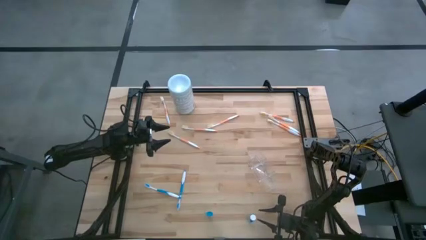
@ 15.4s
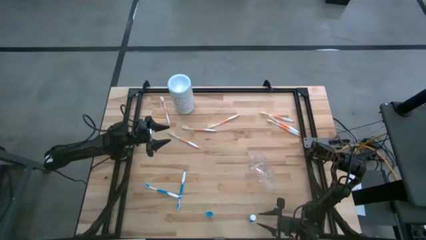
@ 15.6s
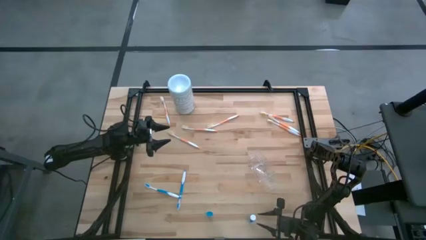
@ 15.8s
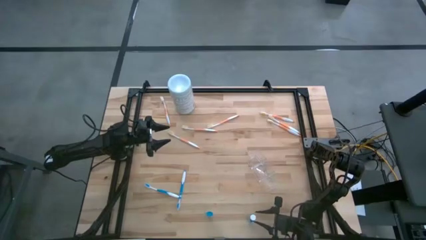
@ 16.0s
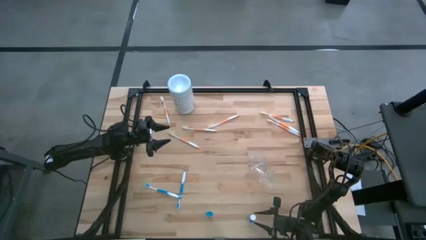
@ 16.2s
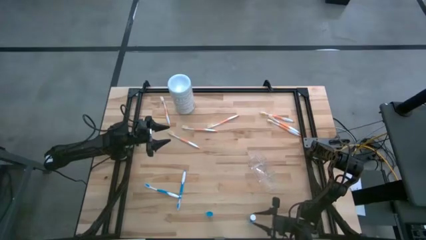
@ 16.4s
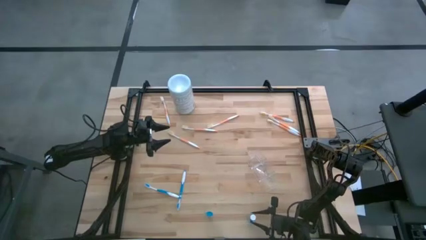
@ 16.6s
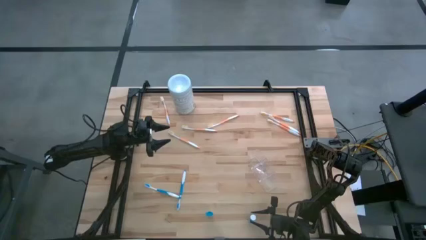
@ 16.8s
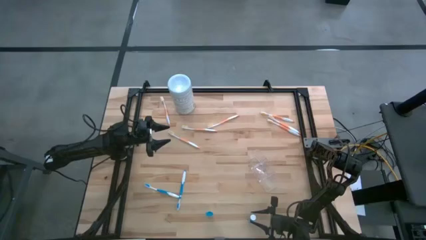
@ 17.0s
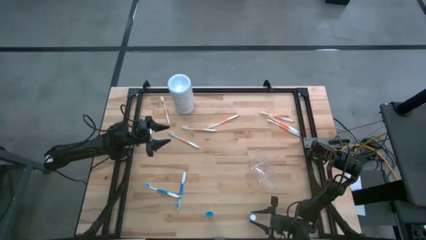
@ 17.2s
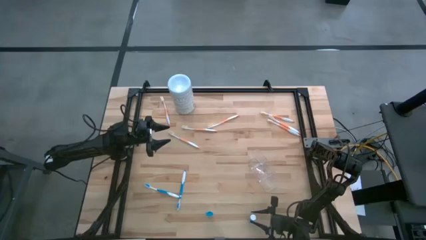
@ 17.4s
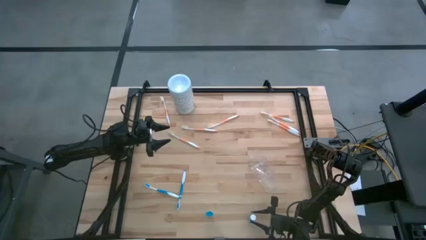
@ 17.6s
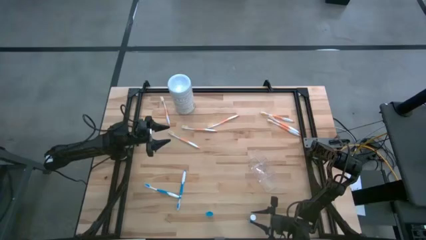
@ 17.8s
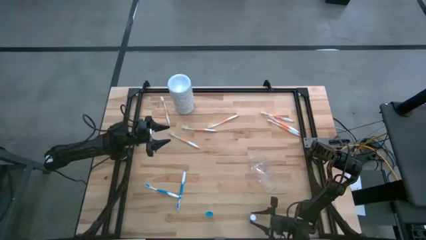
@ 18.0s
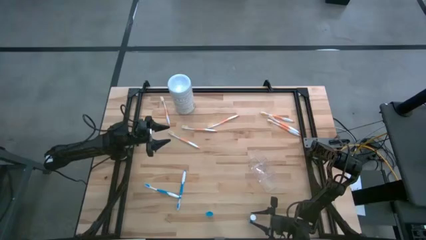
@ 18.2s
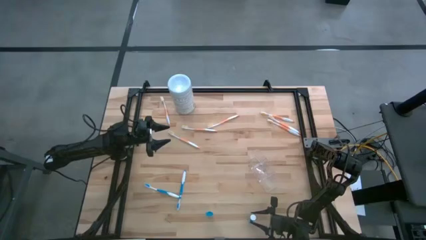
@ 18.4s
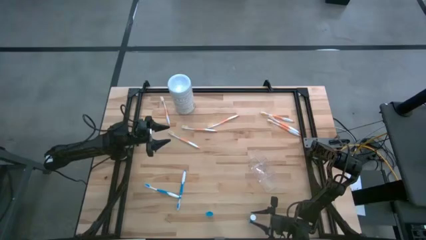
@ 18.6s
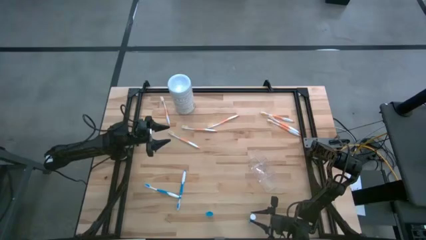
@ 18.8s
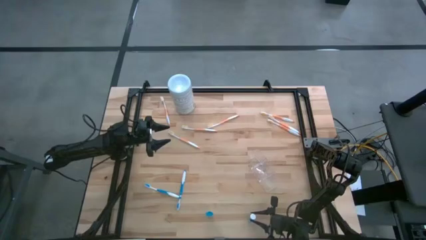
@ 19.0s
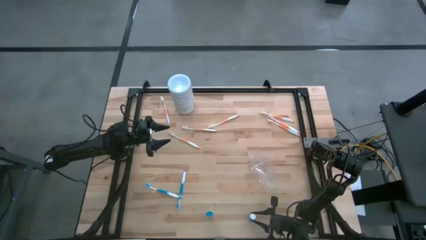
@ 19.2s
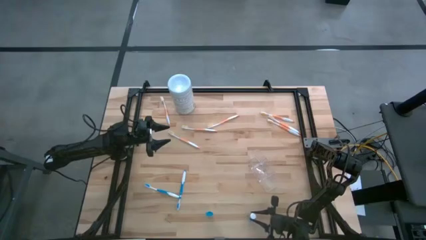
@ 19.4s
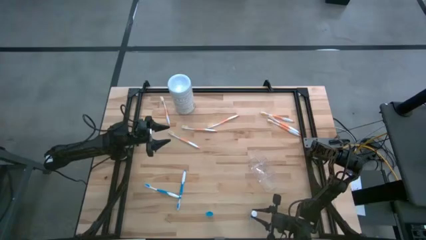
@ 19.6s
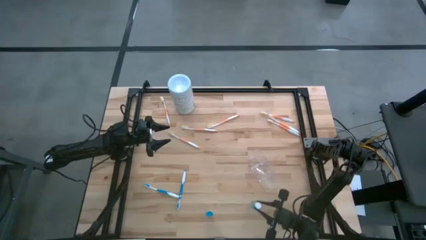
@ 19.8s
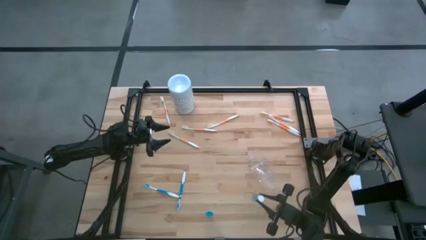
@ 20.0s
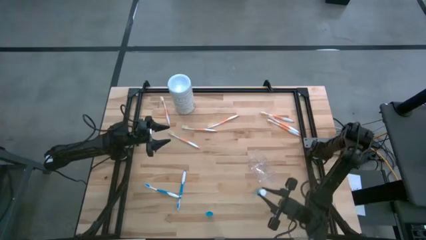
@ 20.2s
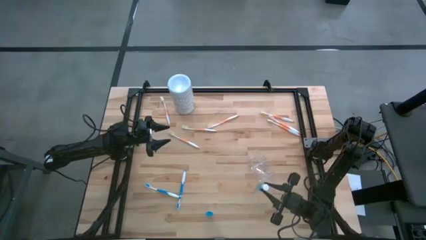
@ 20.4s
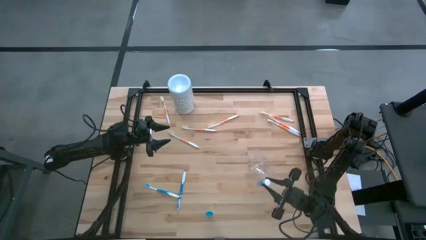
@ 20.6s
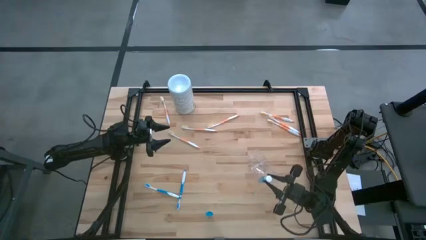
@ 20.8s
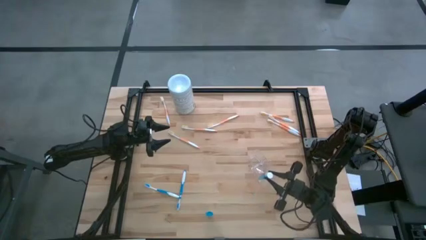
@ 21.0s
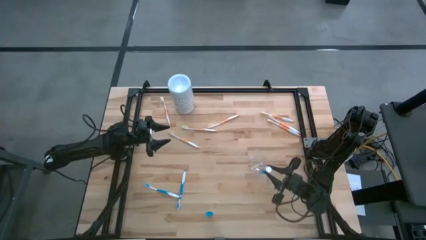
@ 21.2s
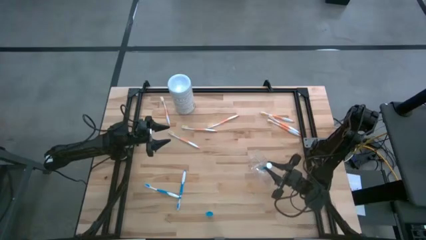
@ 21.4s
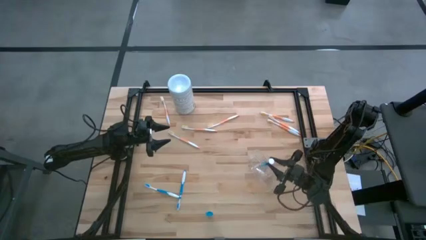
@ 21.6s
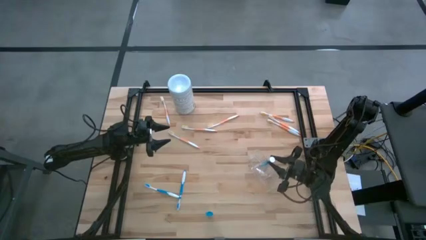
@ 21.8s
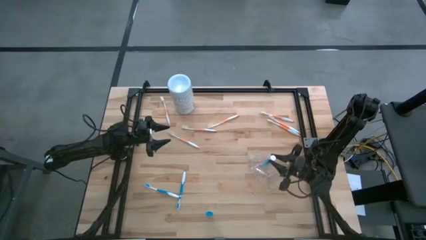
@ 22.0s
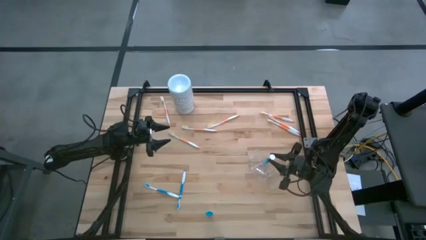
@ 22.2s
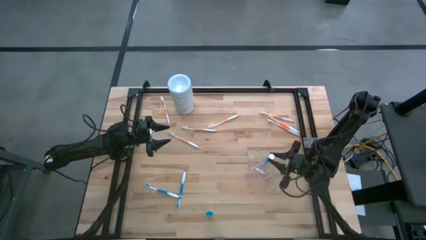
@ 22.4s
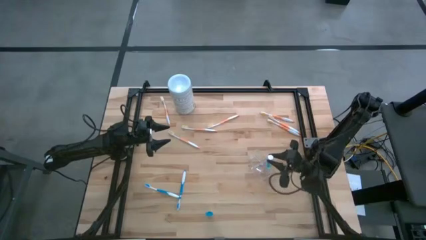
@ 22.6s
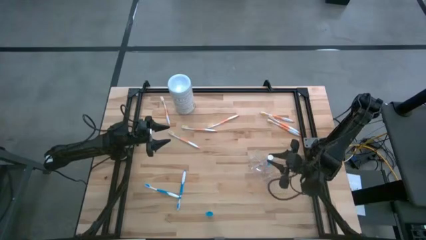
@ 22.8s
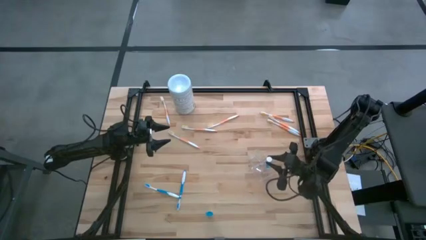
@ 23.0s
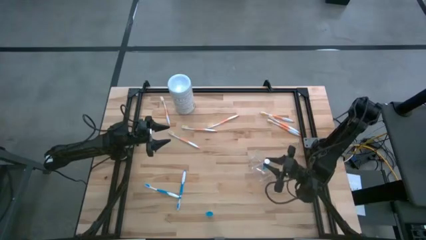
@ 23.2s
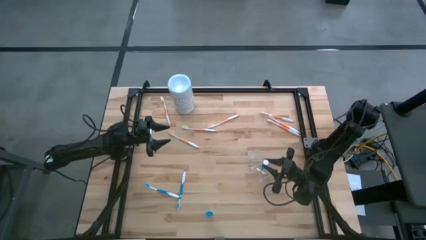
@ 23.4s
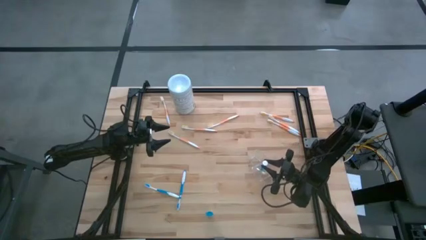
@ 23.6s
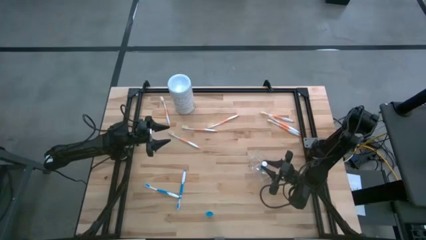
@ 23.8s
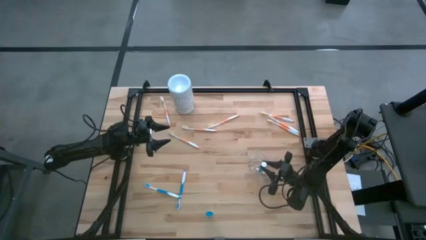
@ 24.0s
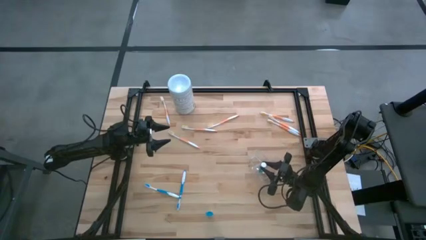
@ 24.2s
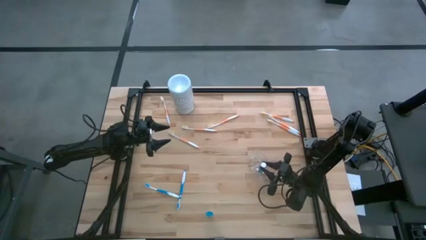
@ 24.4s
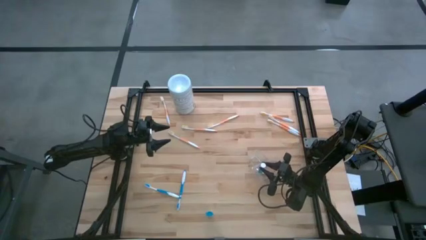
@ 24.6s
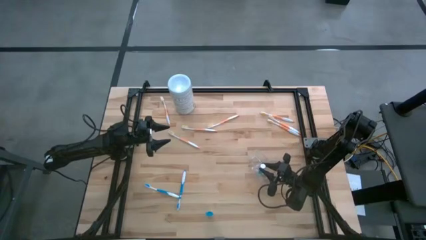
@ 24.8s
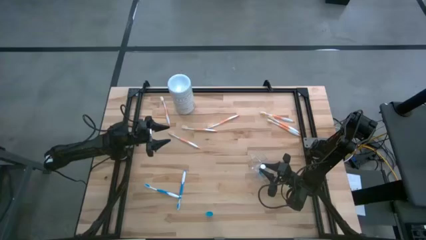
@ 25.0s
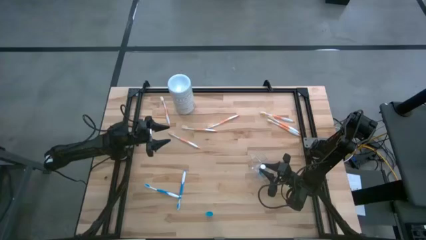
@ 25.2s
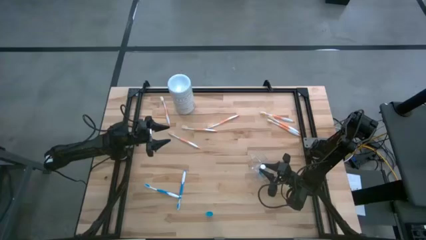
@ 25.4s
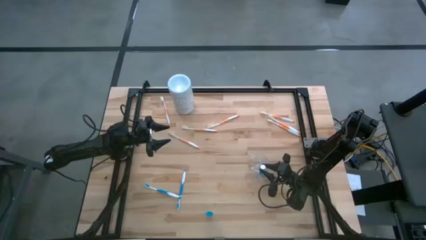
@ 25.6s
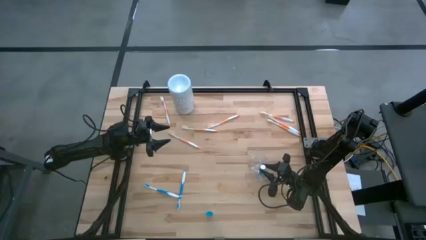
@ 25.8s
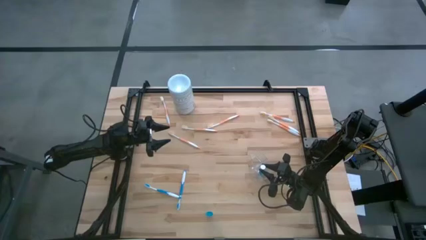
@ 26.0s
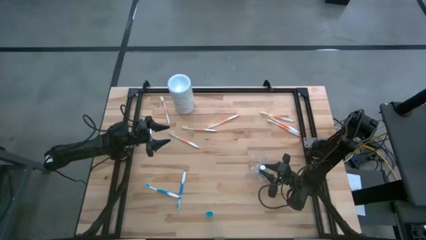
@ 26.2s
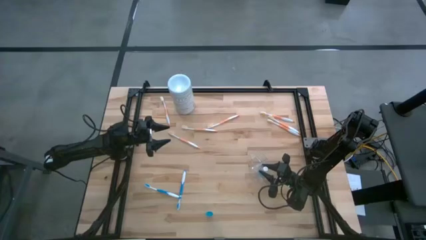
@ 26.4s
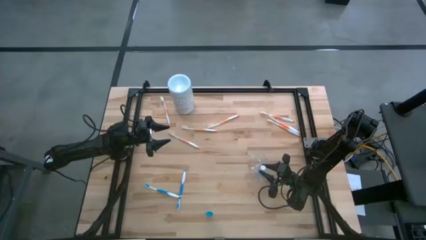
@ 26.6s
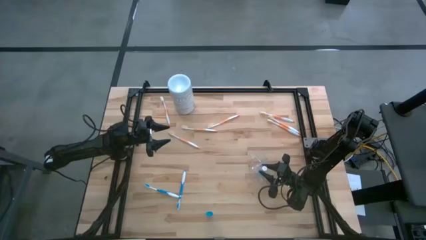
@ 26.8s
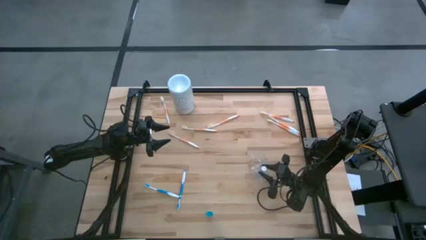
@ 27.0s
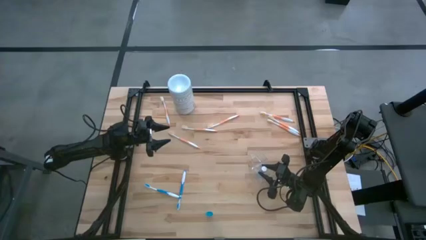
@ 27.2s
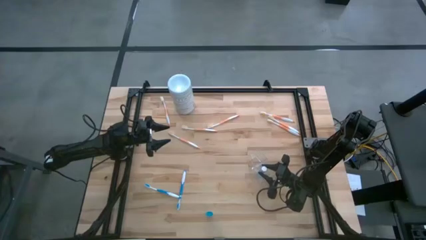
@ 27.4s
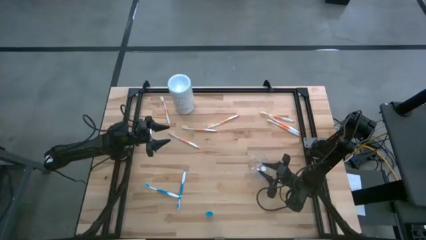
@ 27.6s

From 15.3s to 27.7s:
Task: Pick & Place toothbrushing station
Put the mouthwash into the middle section of the transparent organizer

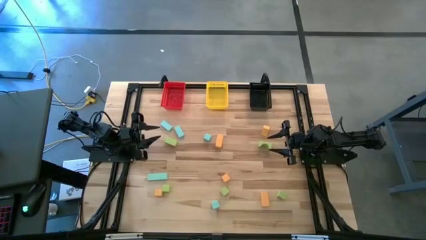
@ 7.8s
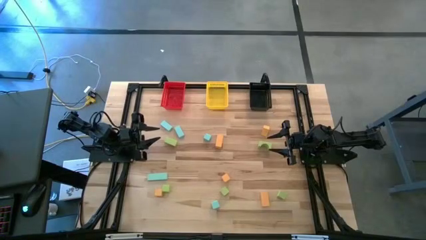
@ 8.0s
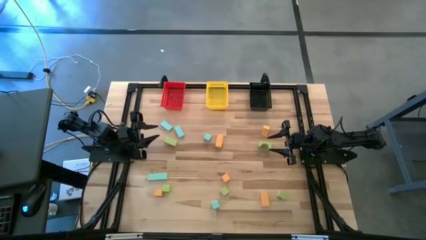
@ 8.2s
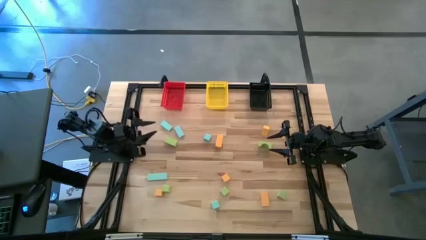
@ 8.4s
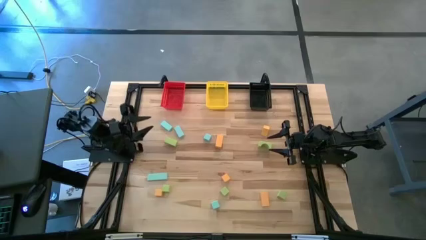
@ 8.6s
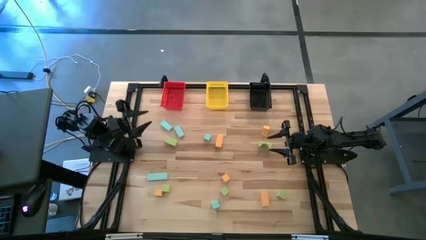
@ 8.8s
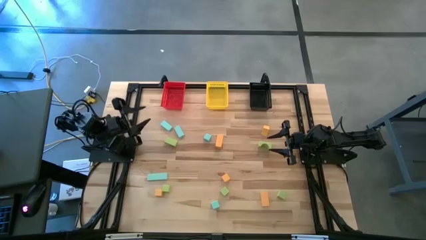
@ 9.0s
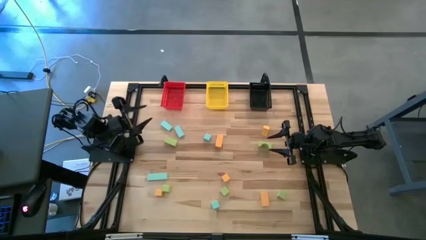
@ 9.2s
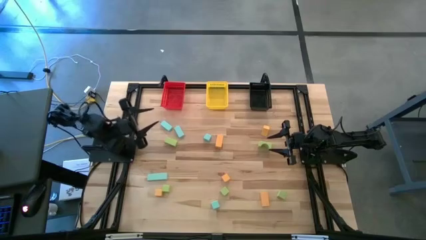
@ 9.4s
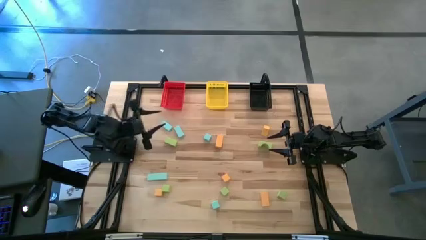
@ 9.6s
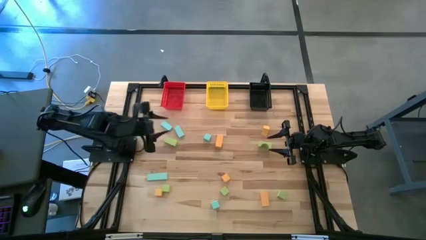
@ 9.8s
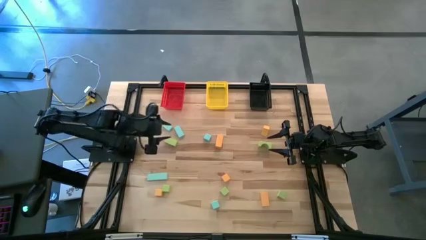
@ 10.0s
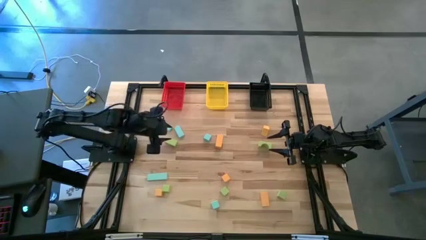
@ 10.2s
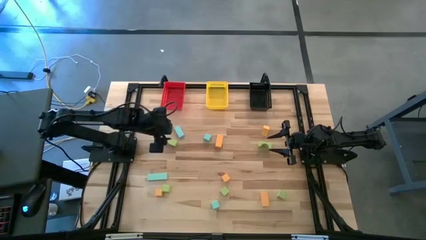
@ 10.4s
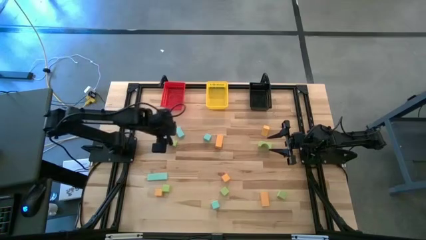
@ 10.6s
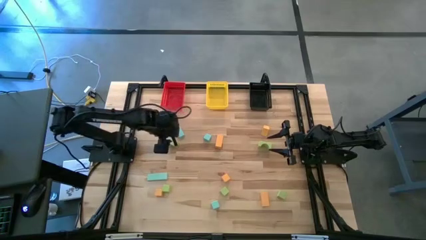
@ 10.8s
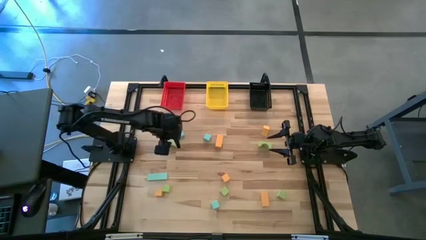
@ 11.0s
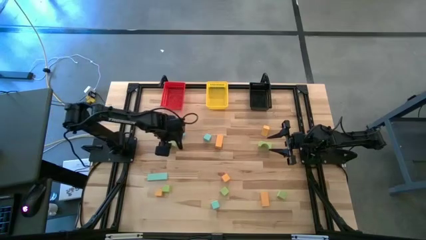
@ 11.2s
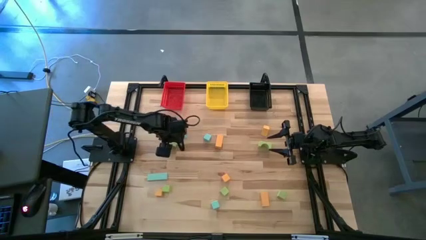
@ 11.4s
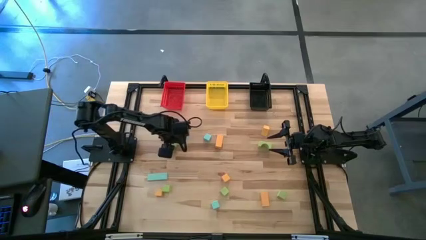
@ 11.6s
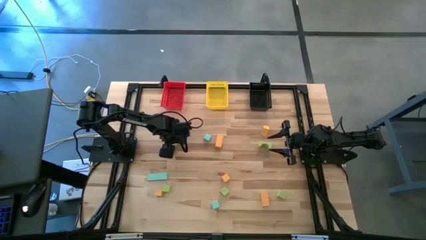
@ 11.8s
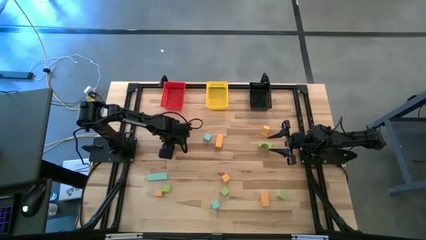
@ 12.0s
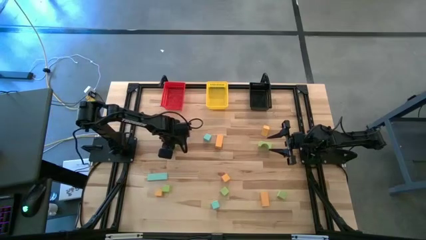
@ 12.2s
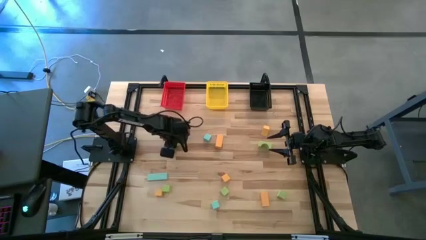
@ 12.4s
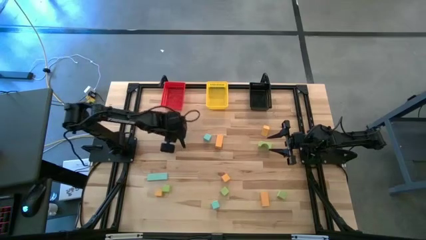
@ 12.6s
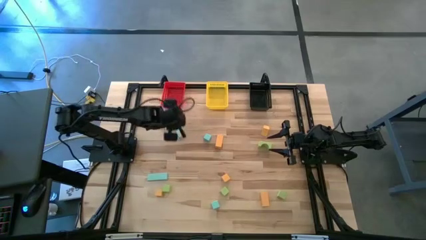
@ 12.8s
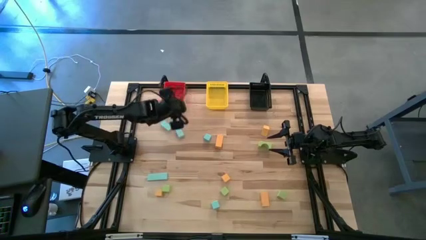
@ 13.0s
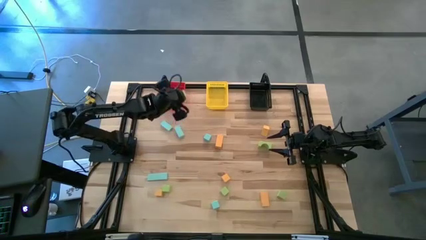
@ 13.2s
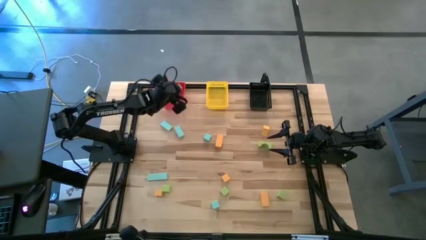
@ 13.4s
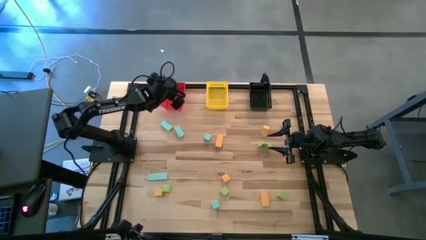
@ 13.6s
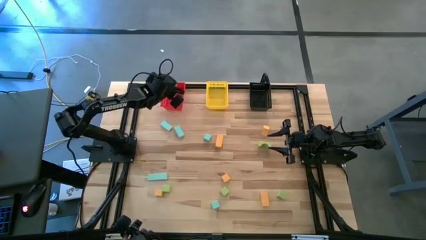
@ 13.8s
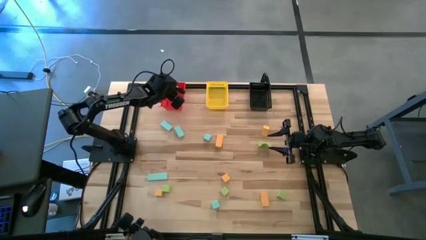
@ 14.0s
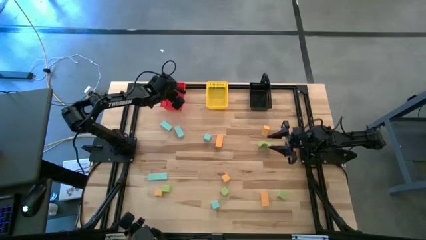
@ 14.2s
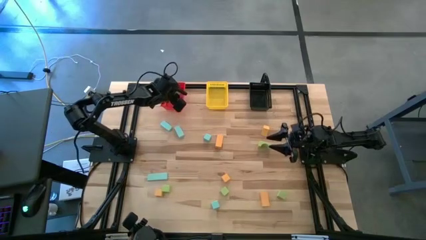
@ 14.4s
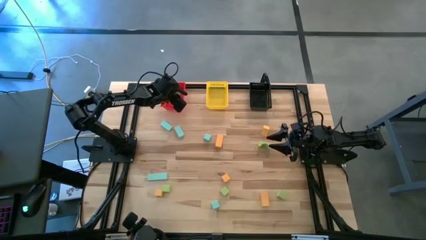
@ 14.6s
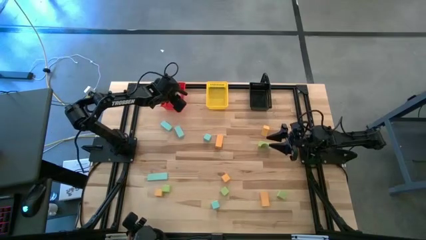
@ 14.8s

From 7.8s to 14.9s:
Task: Sort & place blocks by color
Put the green block into the red bin
